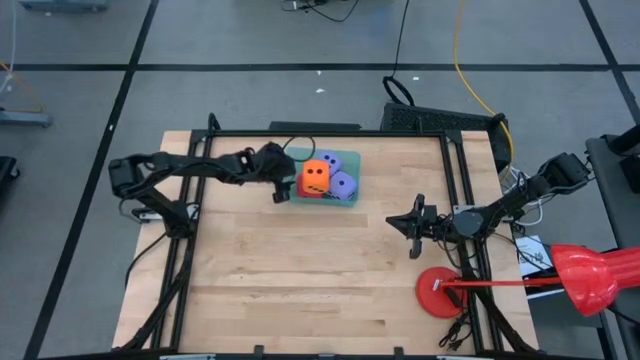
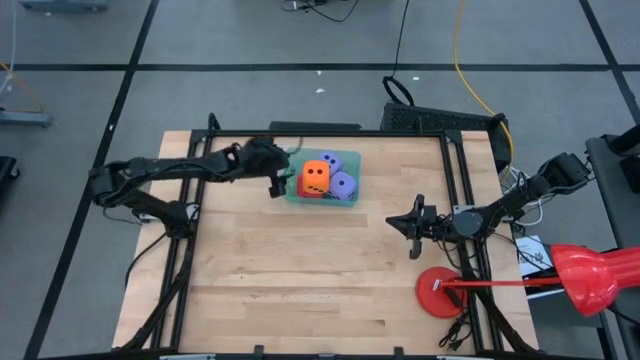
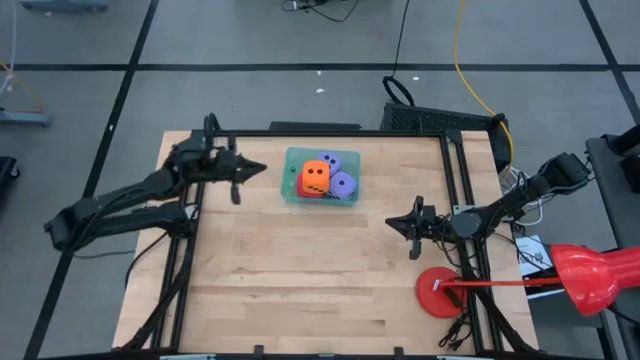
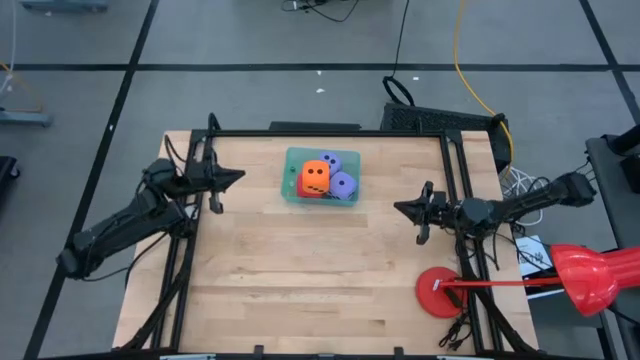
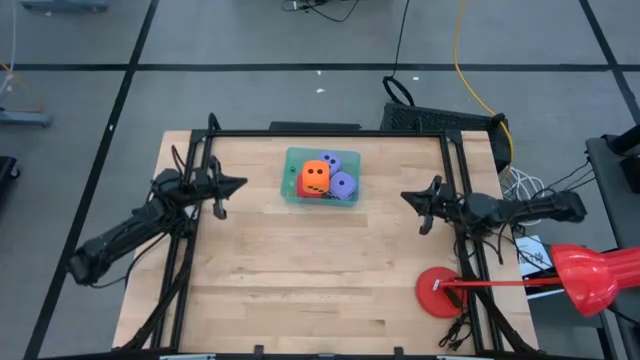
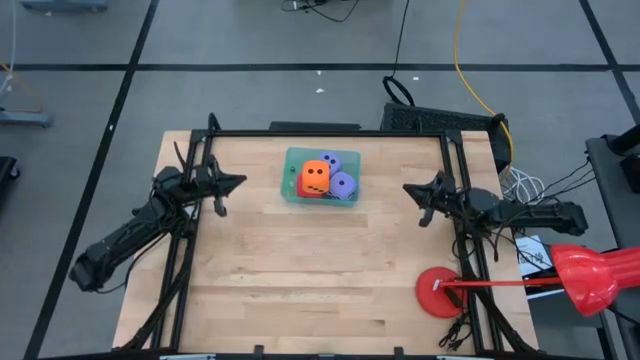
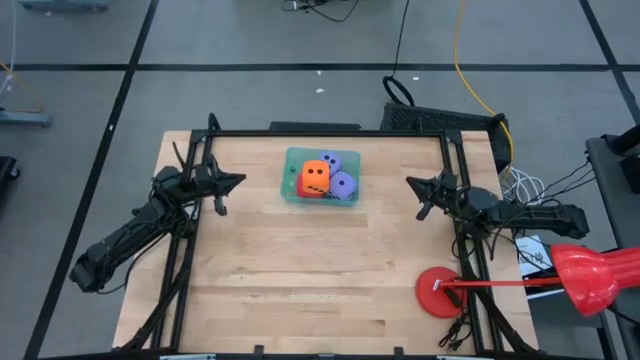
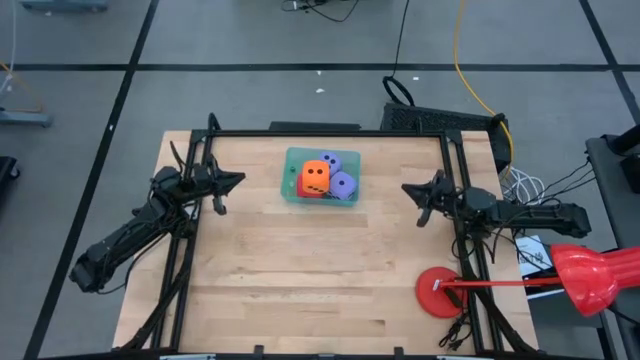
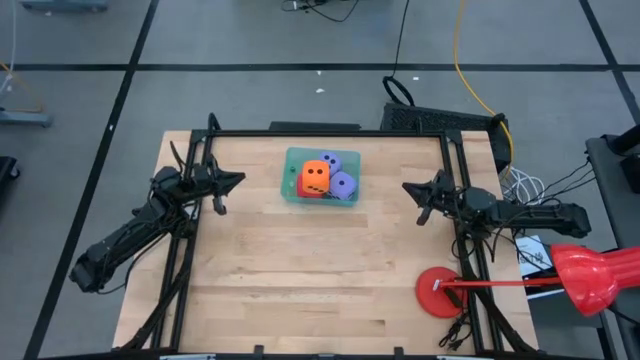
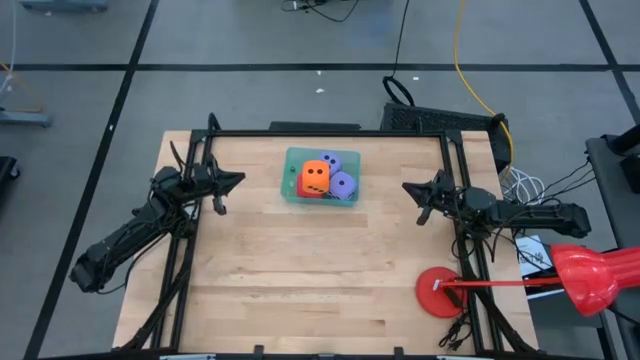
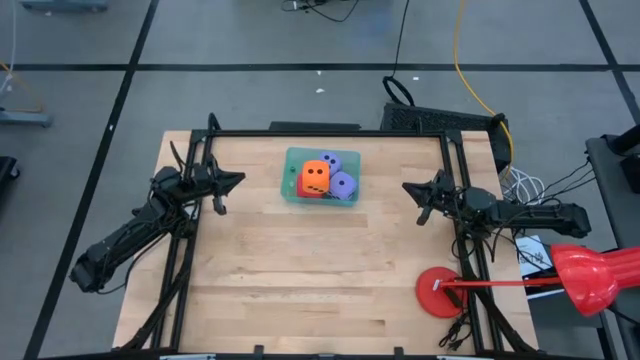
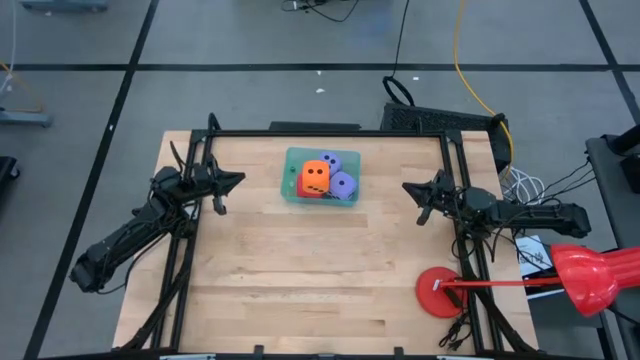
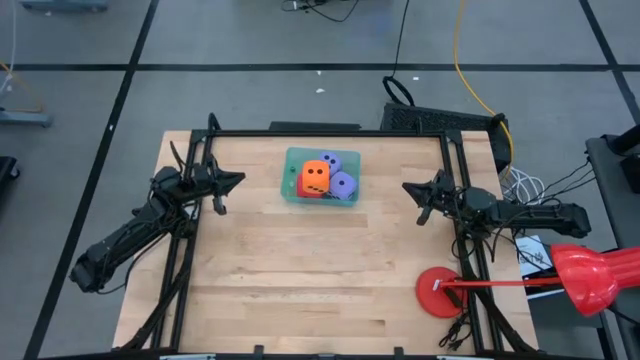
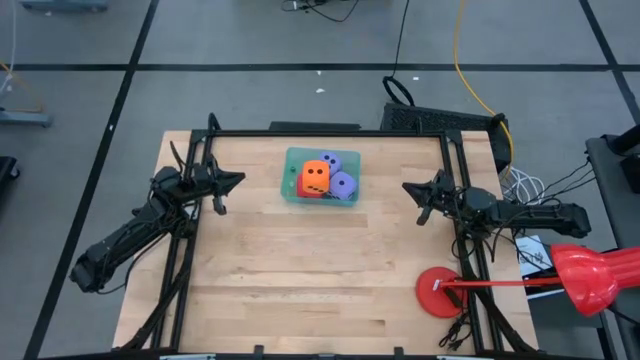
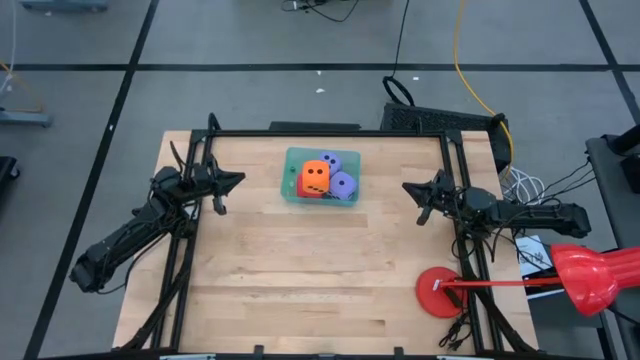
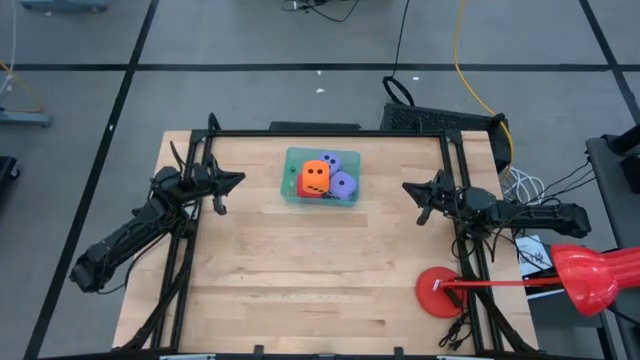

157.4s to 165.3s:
Task: Pick & Place Dice
Return to Home Position

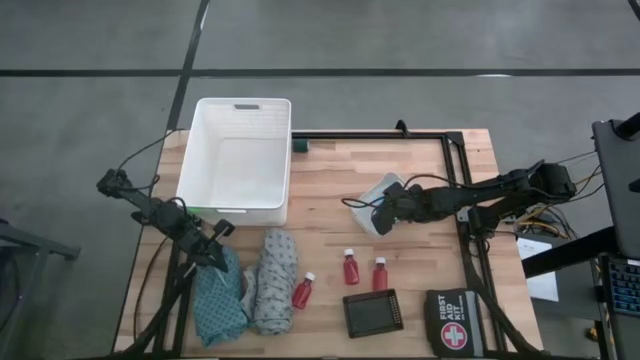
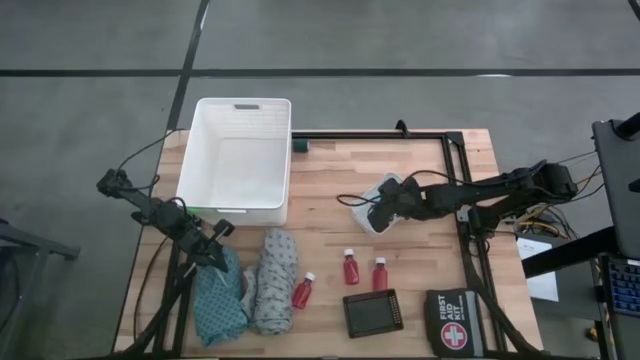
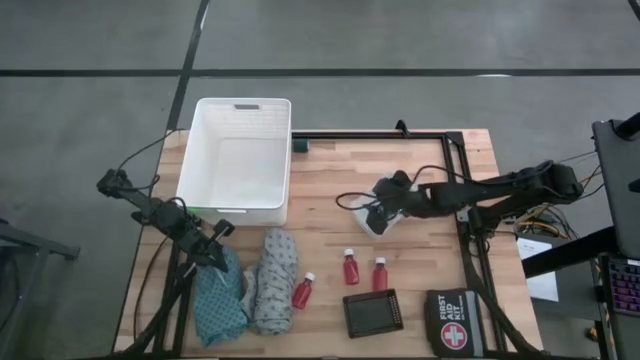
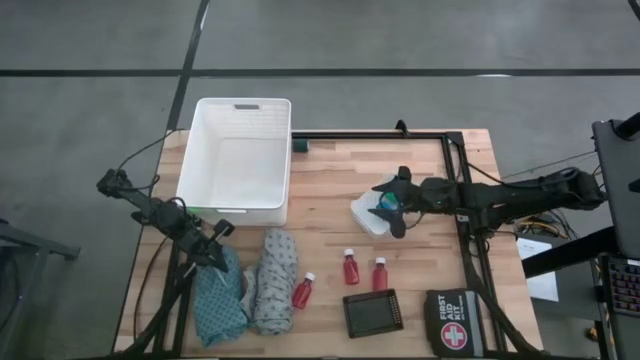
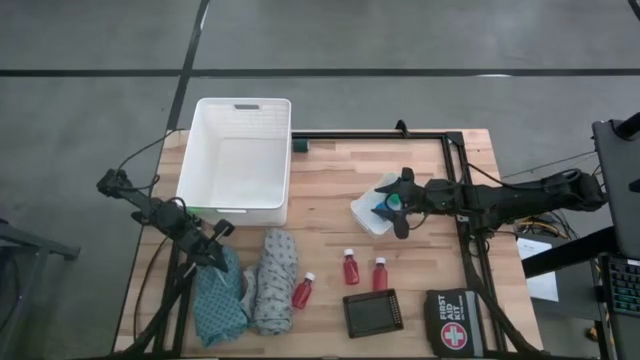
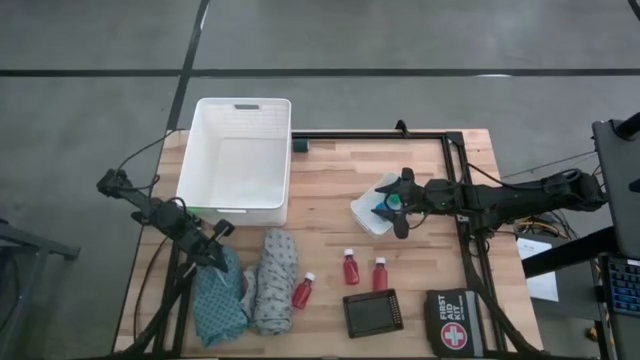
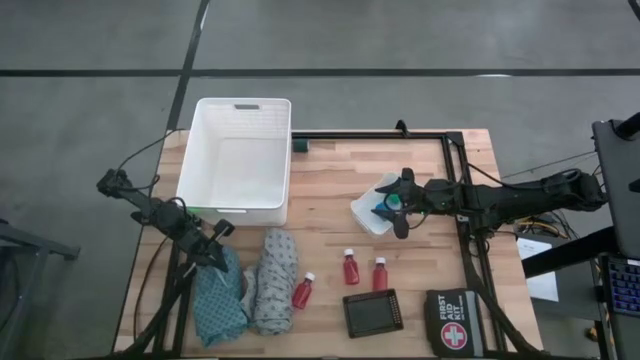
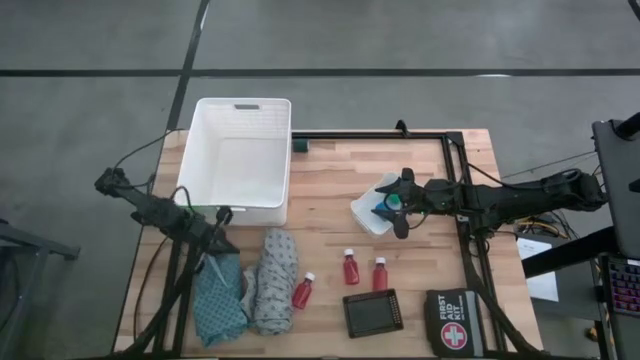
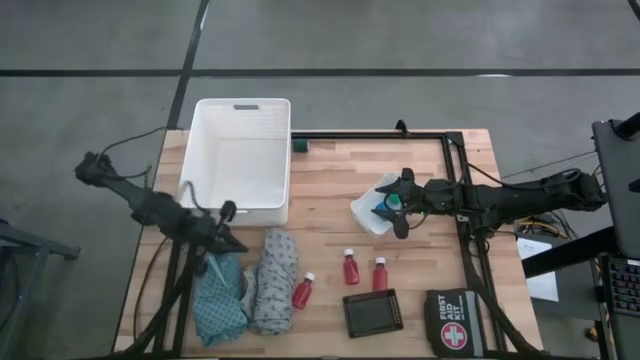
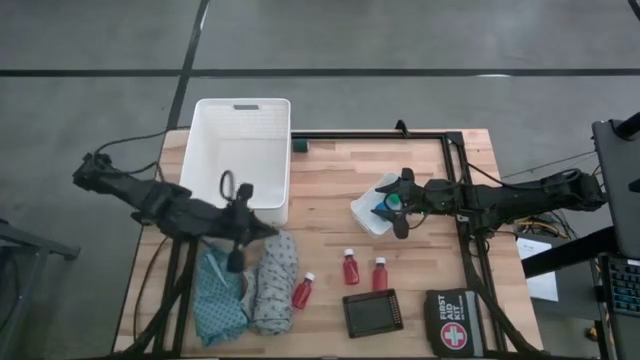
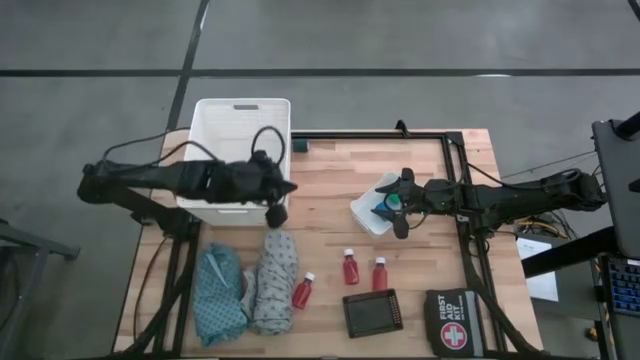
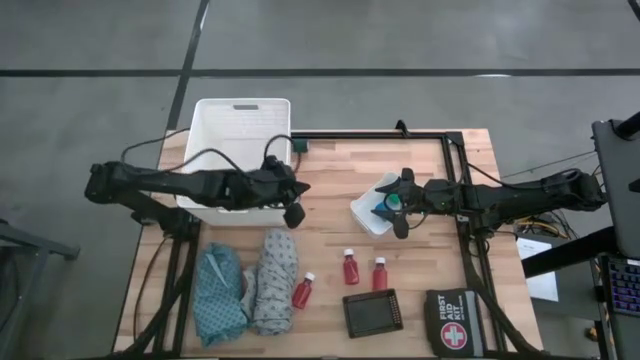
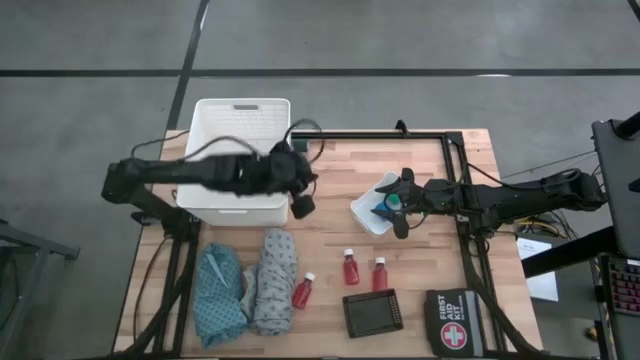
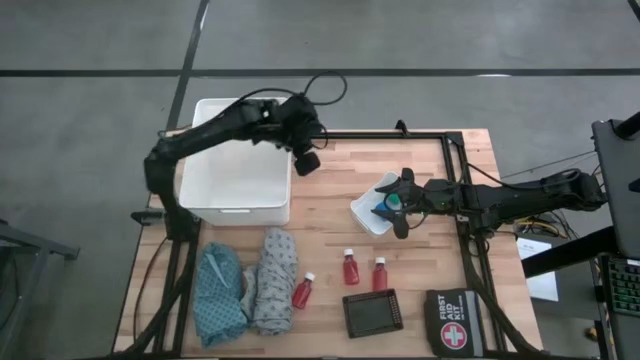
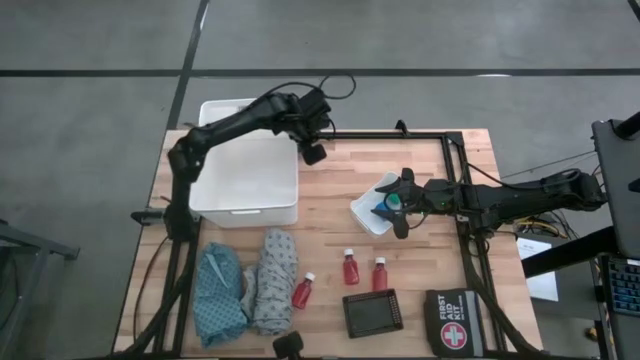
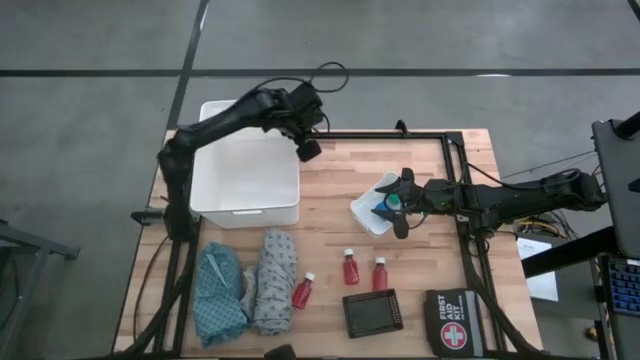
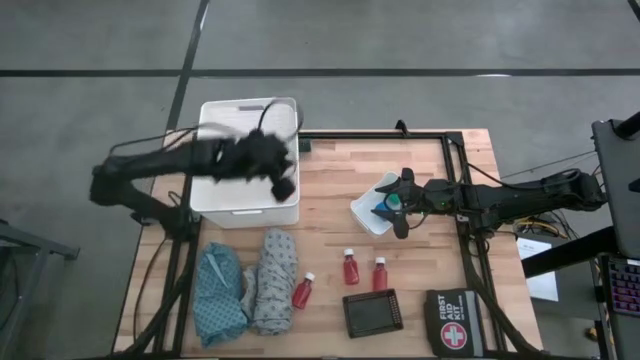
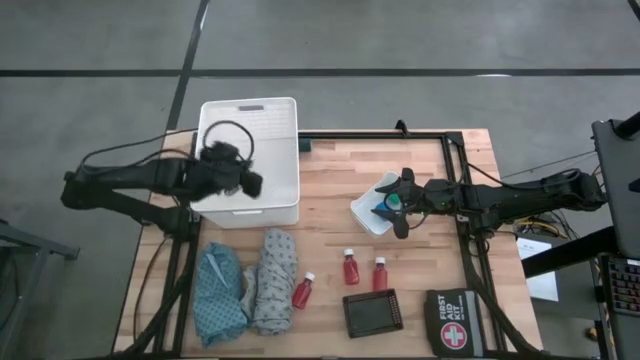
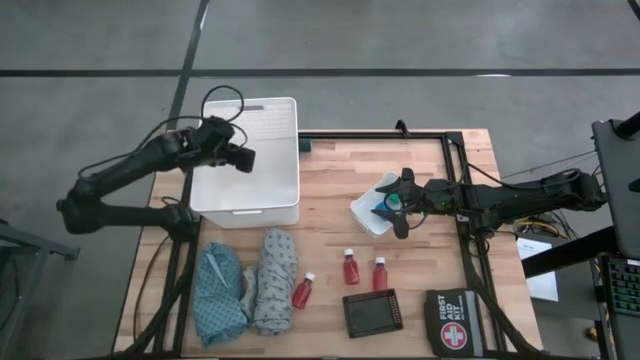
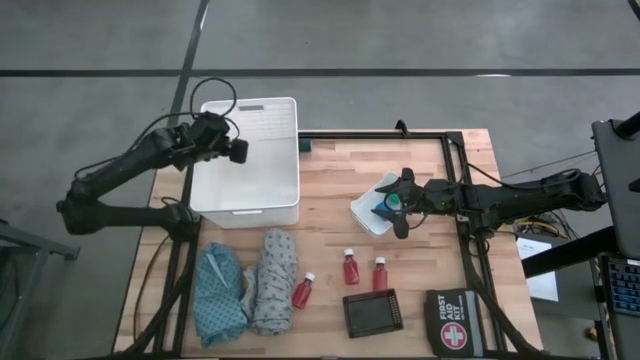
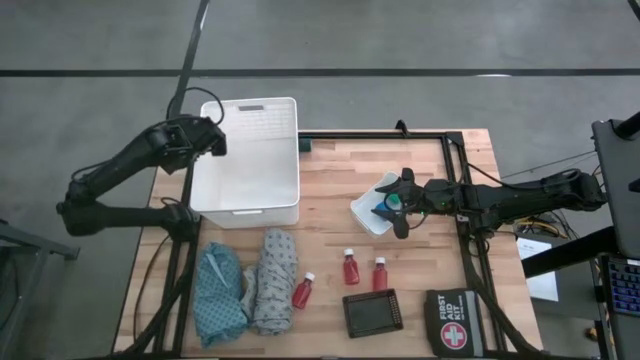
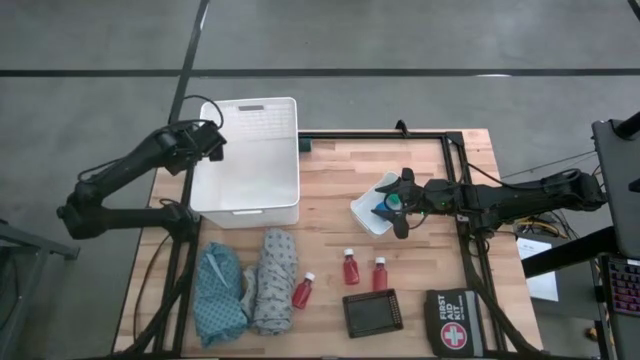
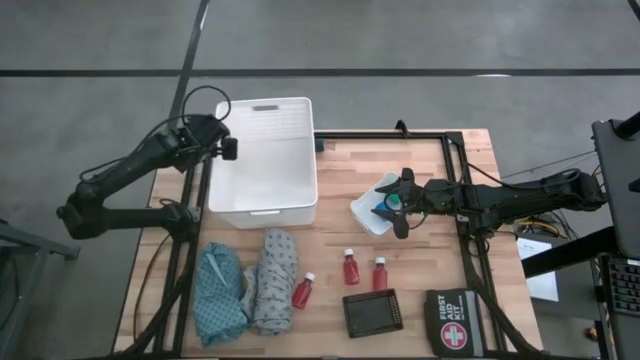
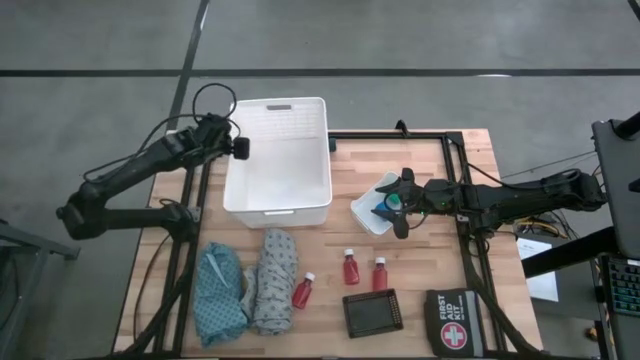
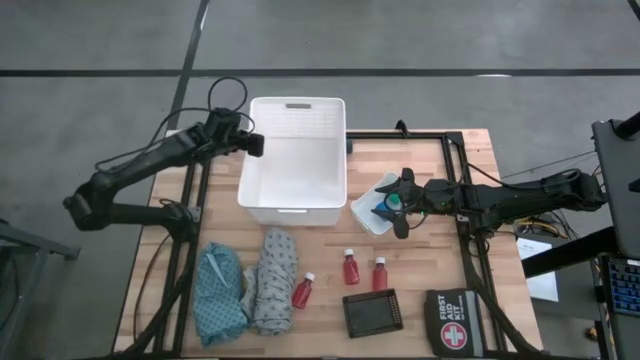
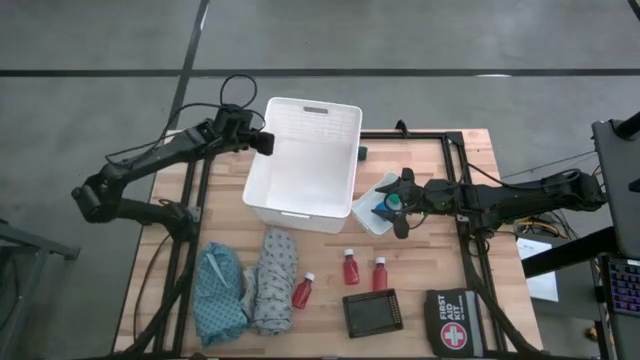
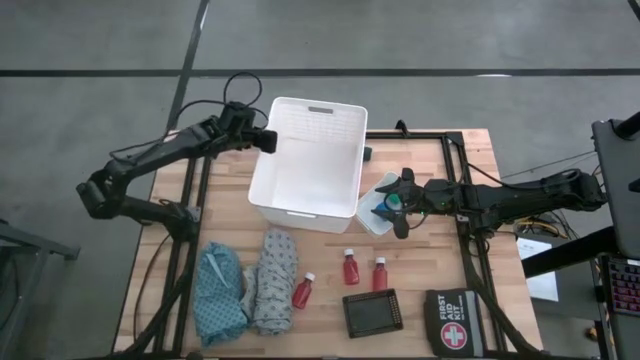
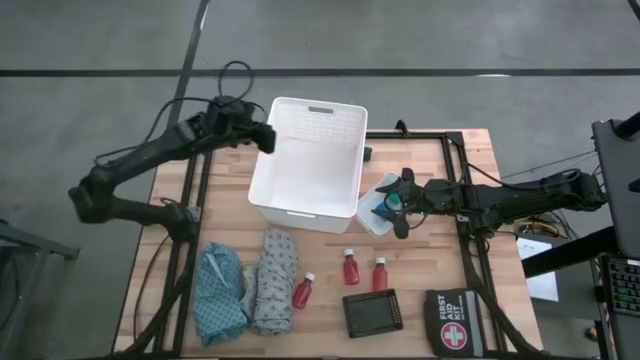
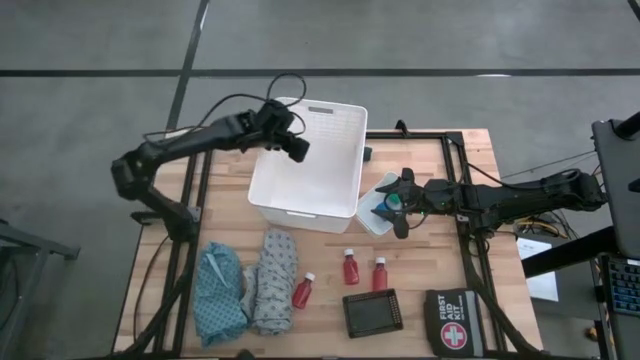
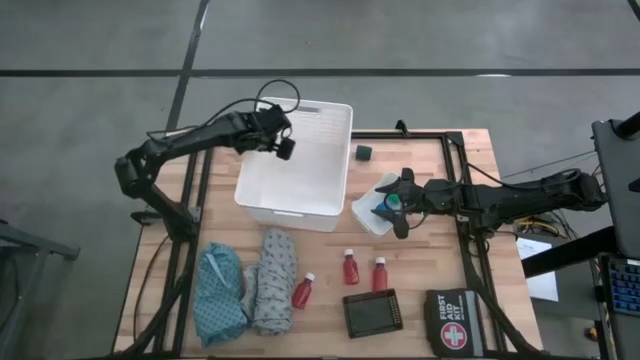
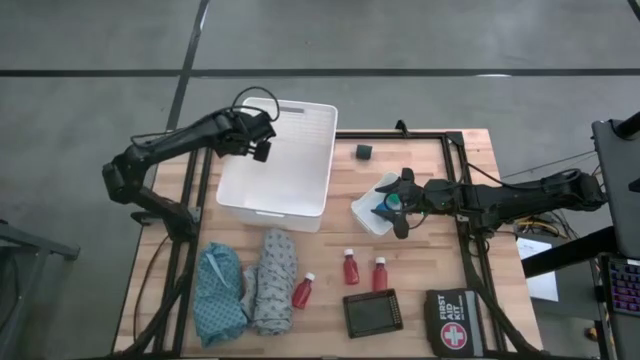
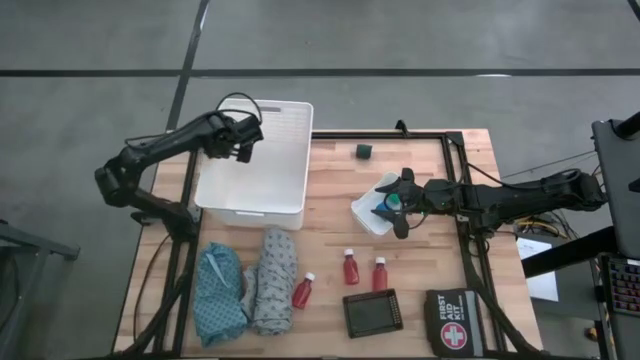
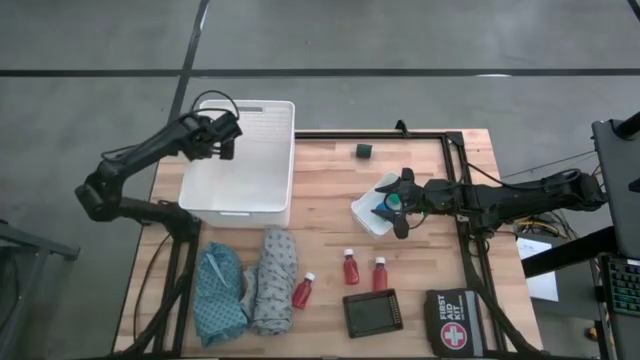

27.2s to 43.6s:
Task: Pick & place medical supplies in basket/bin
Adjust the large white bin
